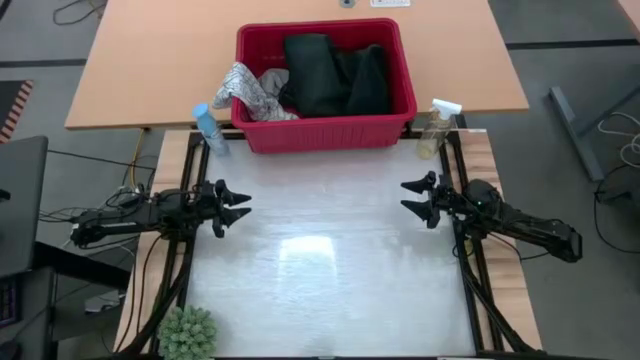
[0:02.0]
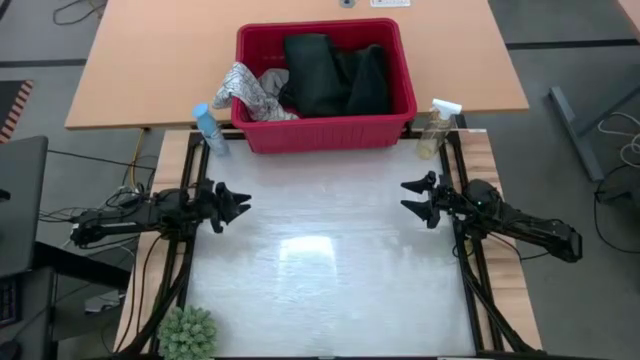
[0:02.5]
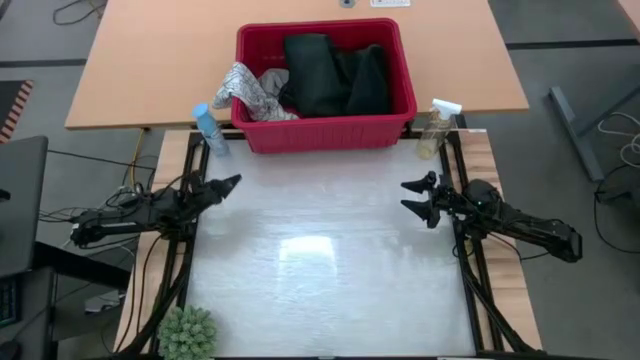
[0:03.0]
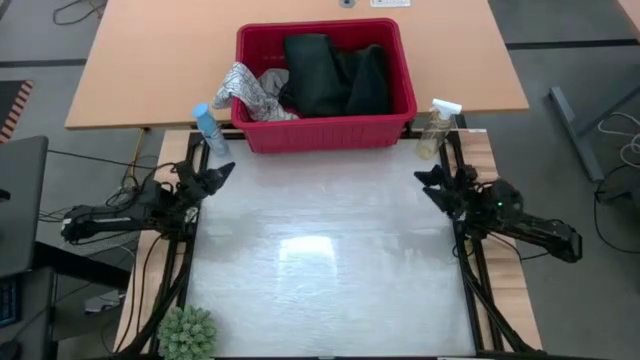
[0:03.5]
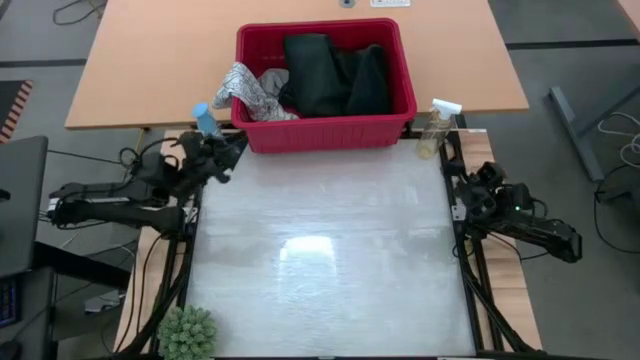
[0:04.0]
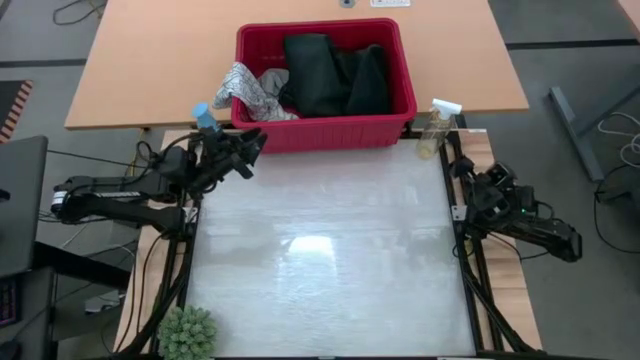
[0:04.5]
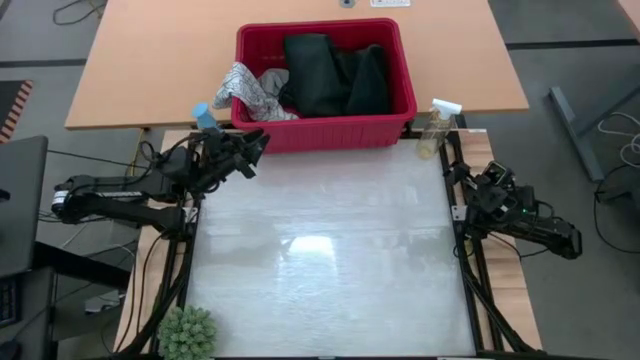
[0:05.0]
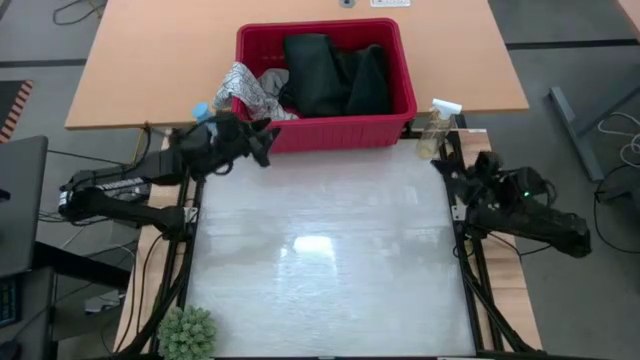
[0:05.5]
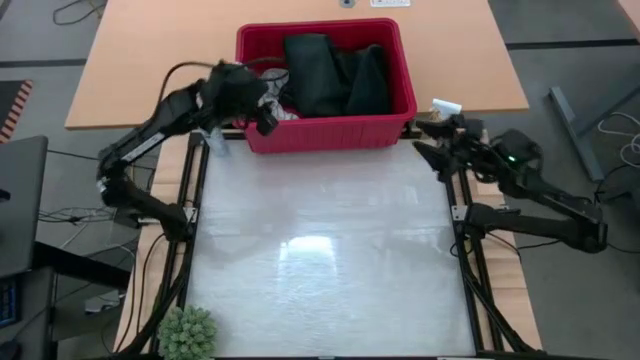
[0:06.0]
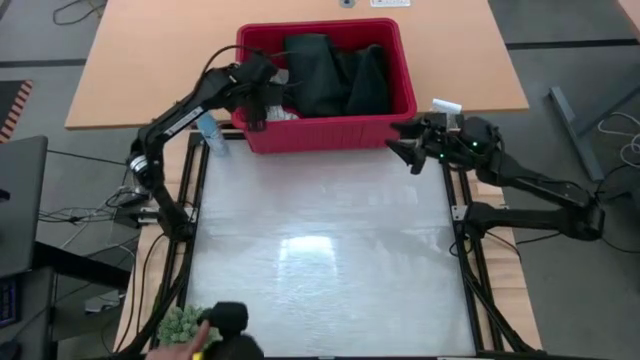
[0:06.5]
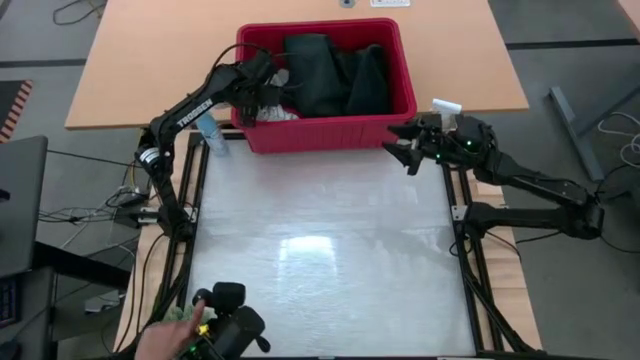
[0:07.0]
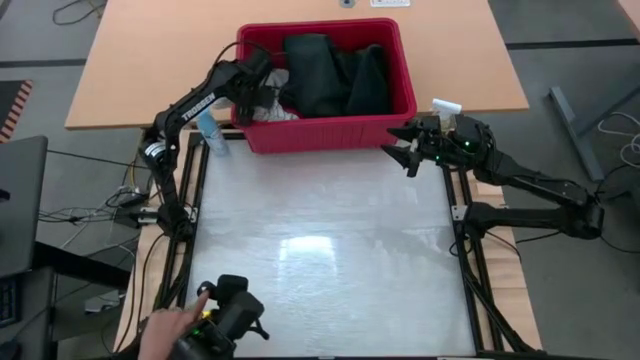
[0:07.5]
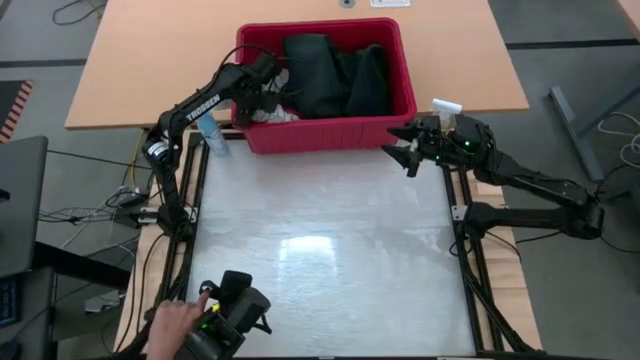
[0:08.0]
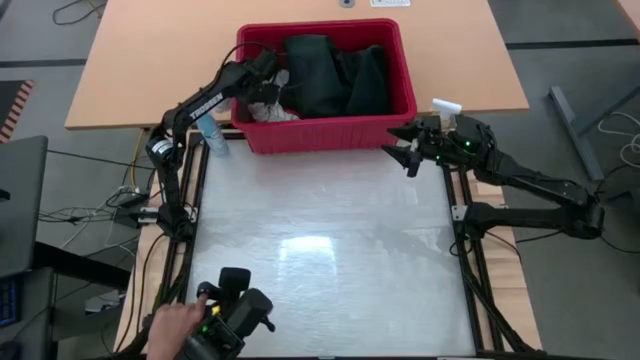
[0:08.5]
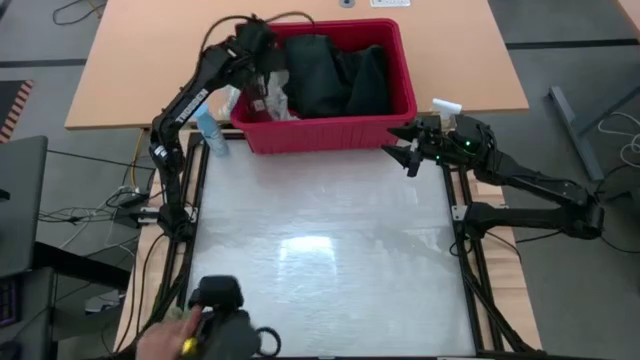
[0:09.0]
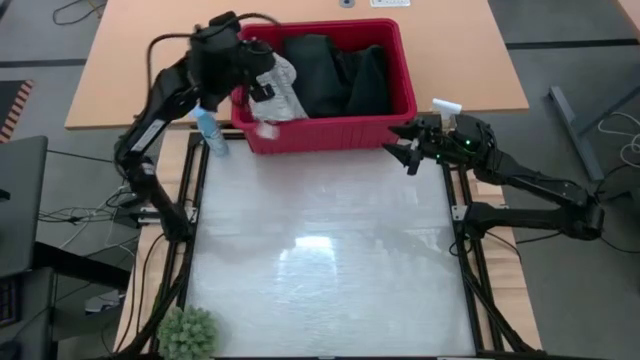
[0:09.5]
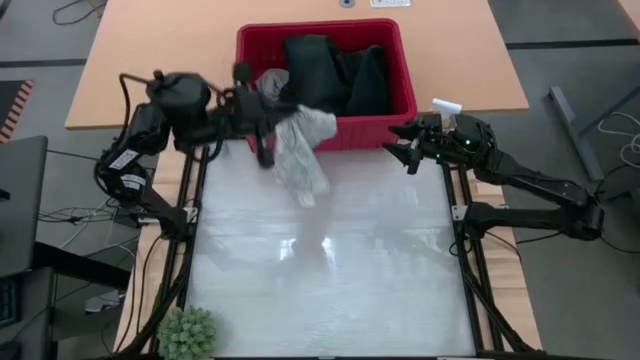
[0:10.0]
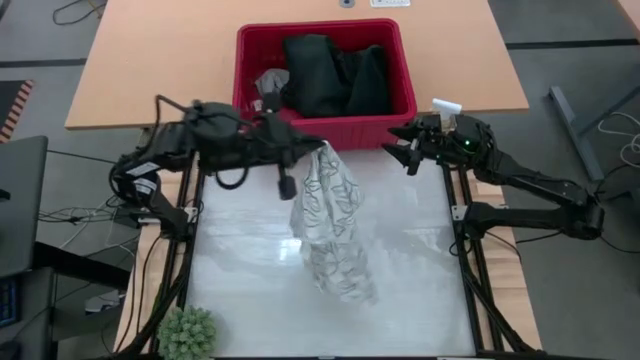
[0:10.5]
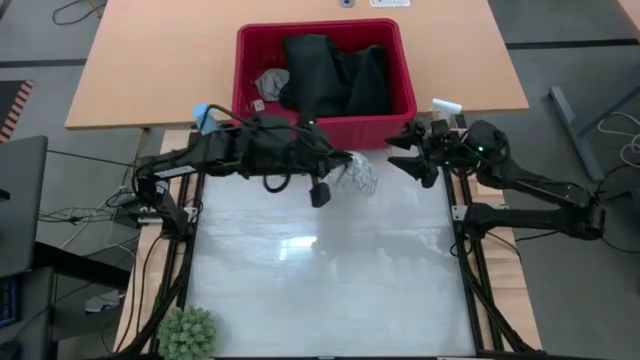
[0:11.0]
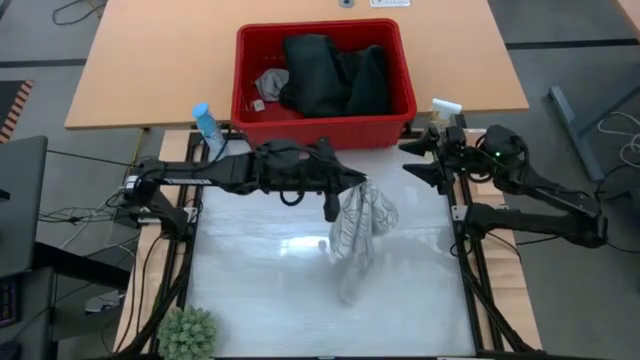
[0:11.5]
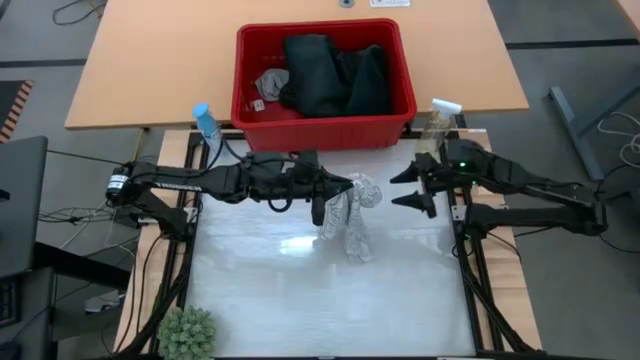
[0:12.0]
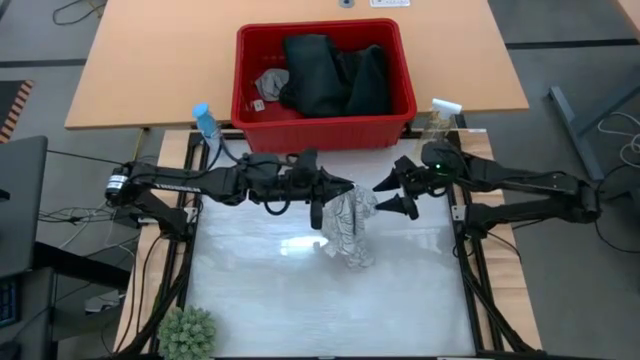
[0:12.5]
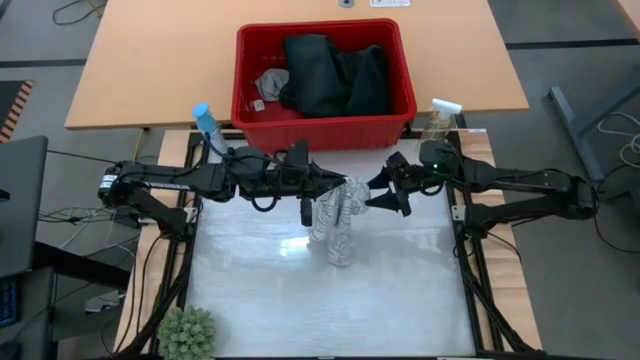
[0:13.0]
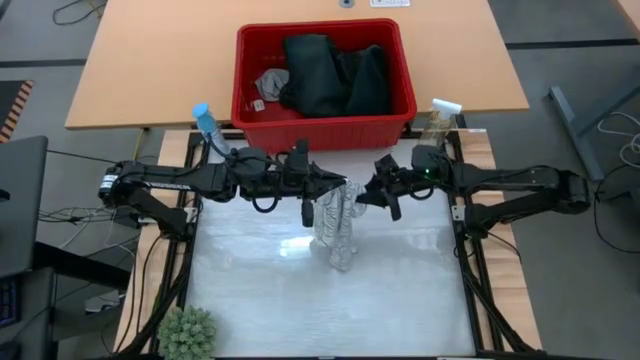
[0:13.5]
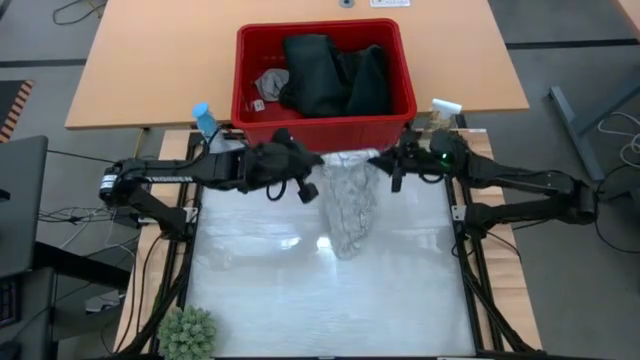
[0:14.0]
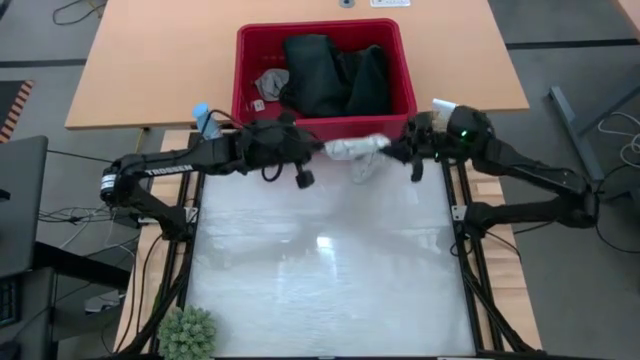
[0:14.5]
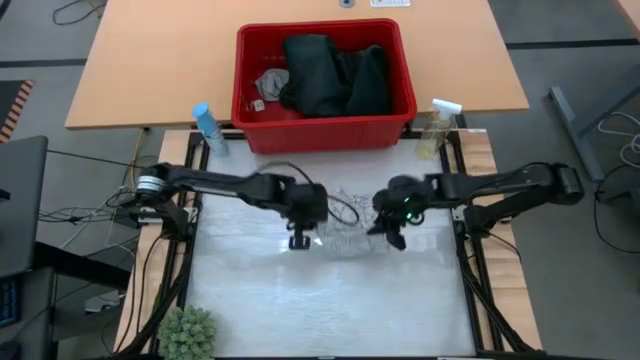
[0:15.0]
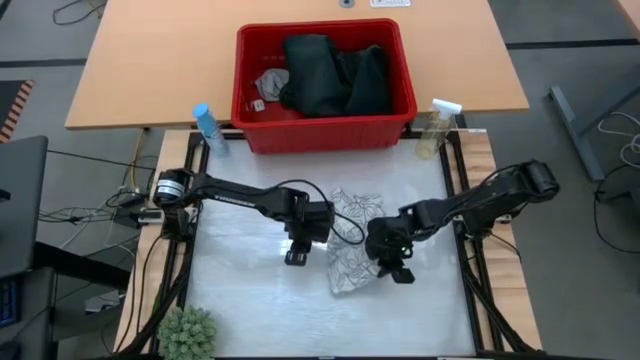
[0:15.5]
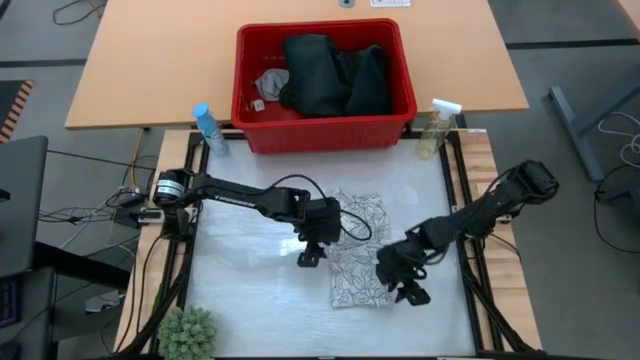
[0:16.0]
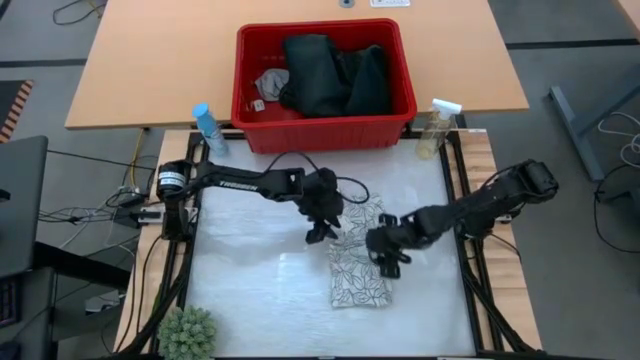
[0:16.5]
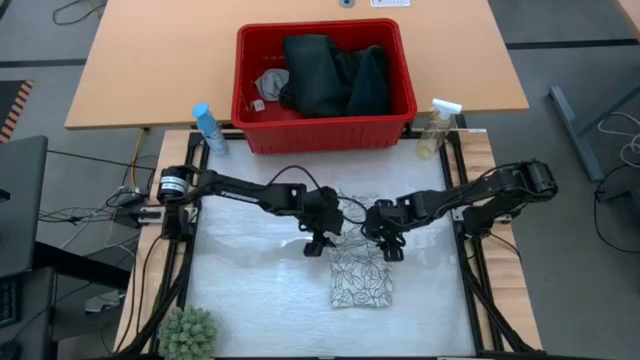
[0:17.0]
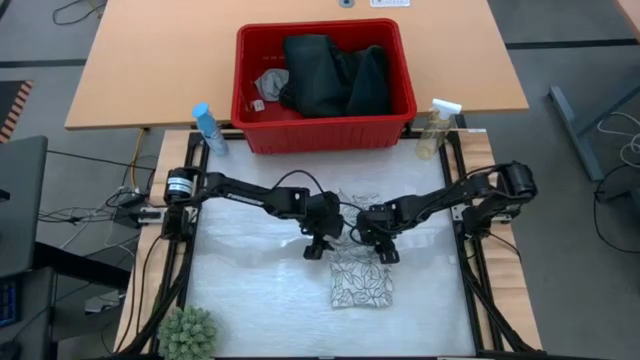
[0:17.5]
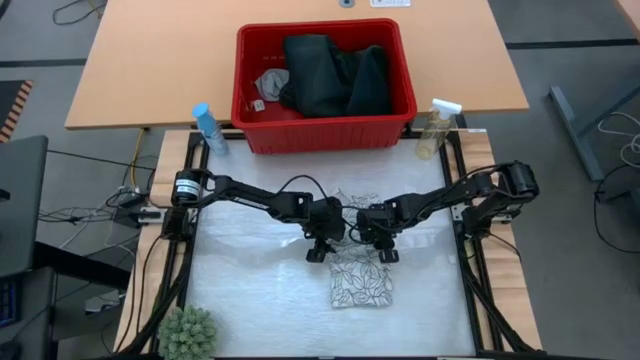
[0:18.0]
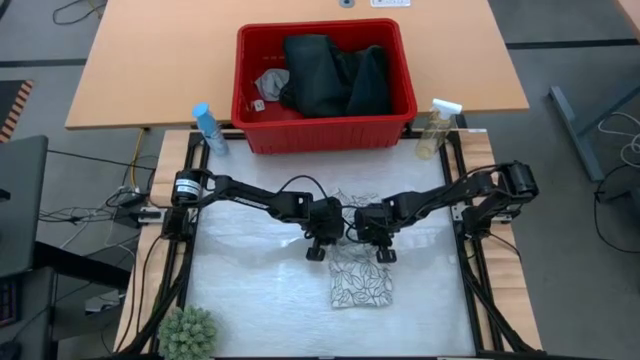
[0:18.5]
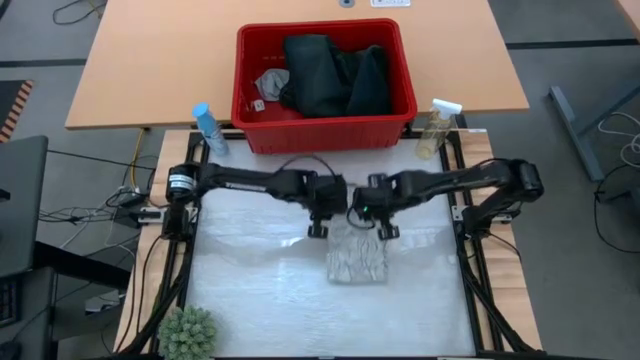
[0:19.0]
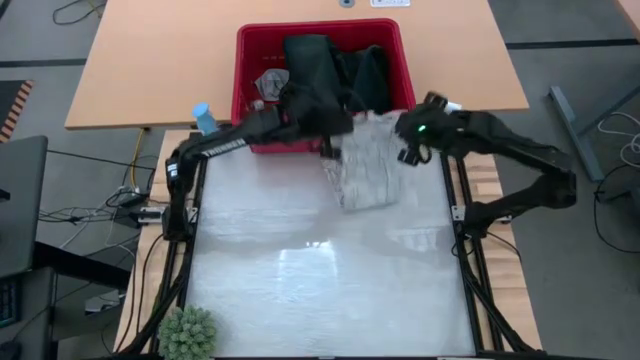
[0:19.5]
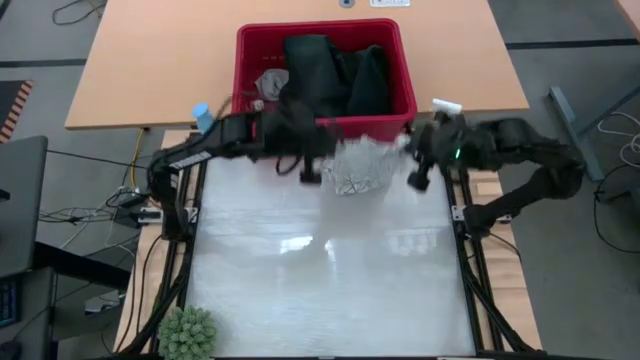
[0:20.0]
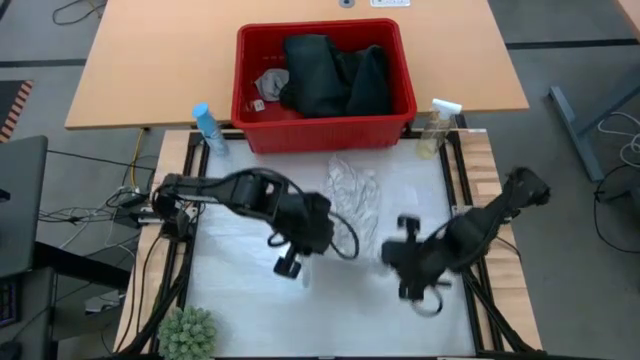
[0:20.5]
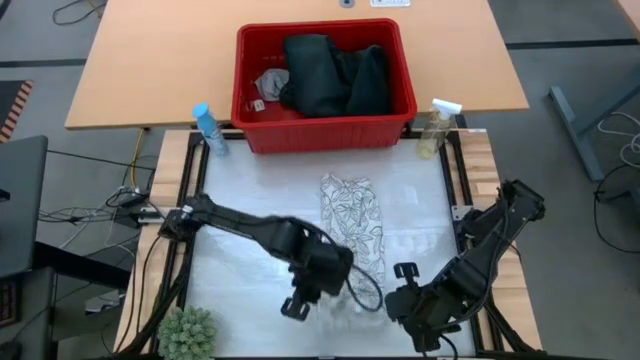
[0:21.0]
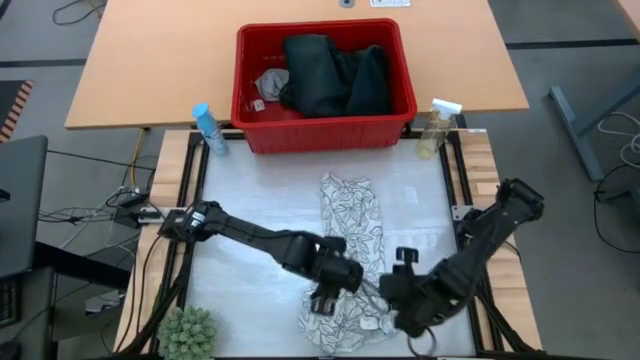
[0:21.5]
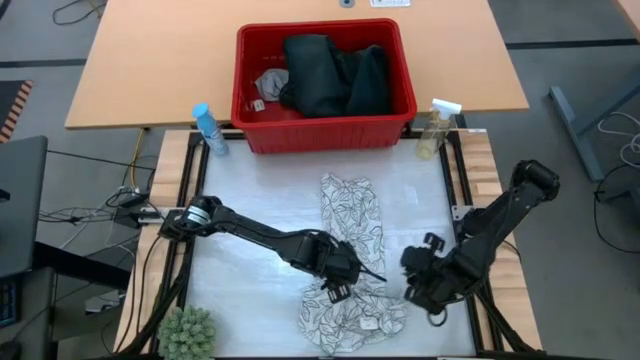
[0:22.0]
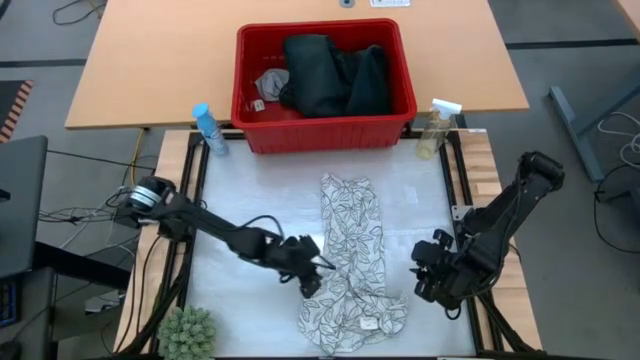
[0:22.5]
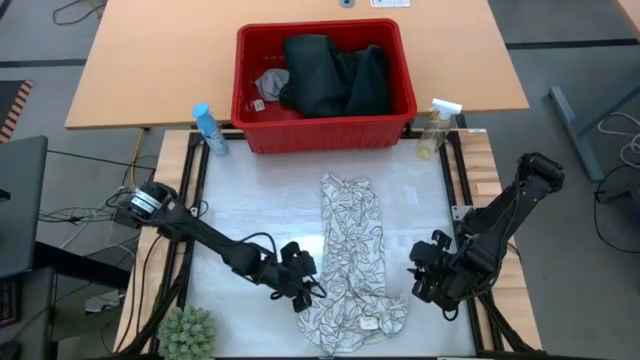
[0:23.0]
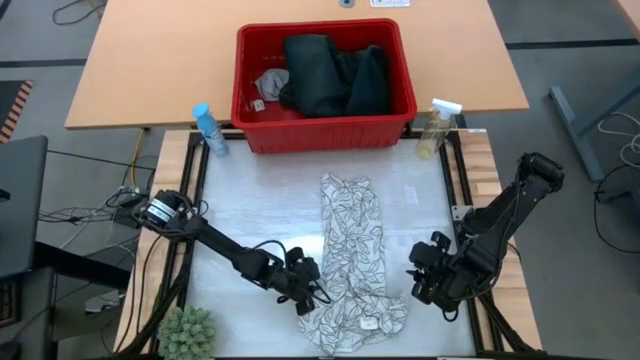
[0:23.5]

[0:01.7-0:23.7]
Task: Fold laundry
Fold the white-patterned shirt
